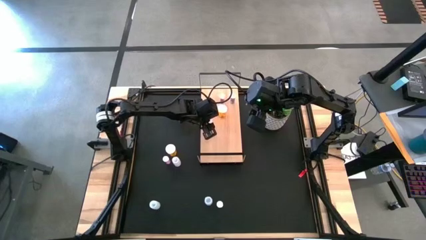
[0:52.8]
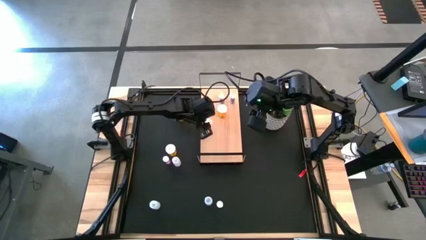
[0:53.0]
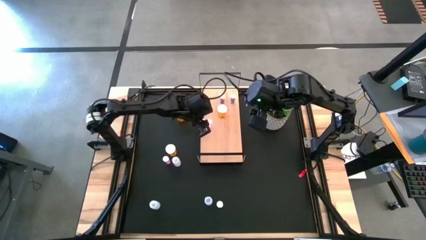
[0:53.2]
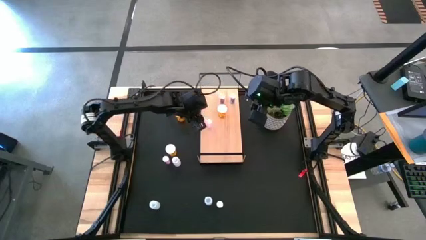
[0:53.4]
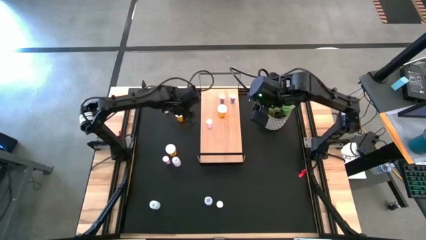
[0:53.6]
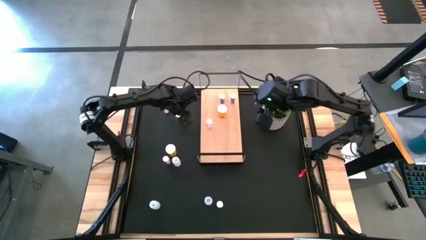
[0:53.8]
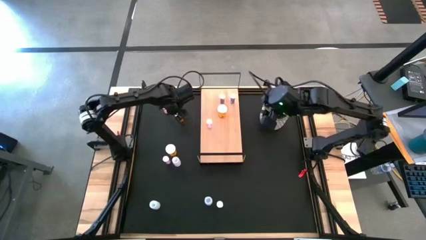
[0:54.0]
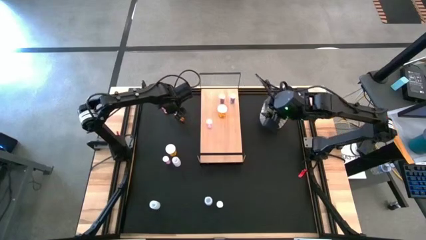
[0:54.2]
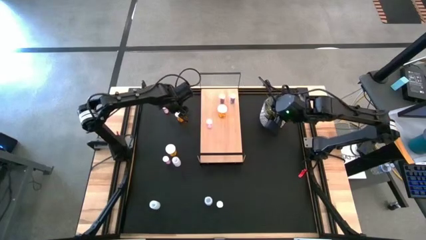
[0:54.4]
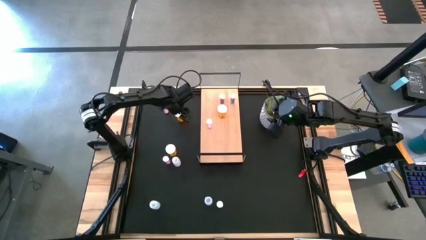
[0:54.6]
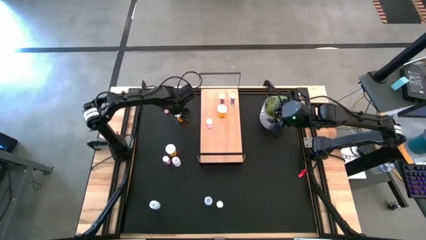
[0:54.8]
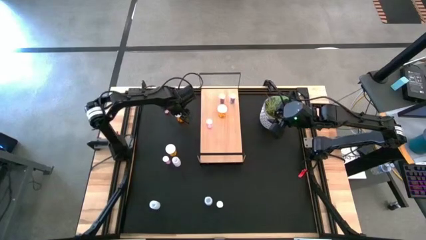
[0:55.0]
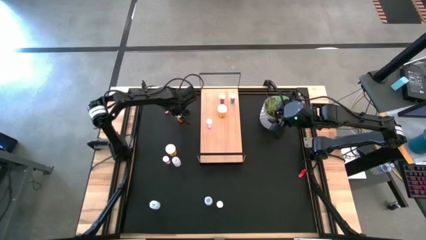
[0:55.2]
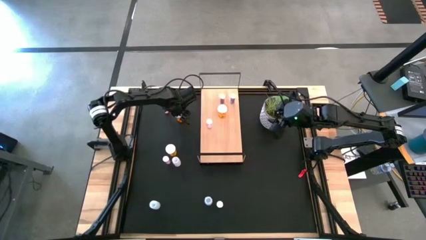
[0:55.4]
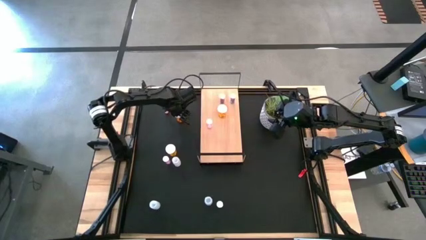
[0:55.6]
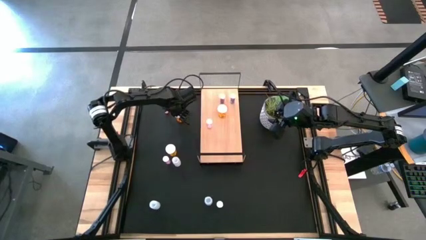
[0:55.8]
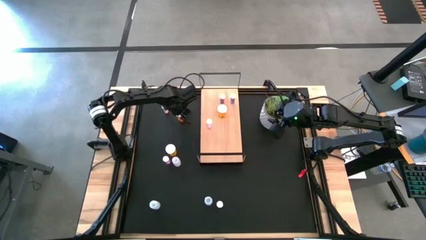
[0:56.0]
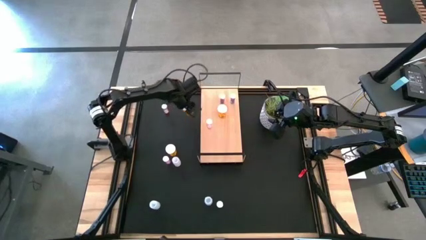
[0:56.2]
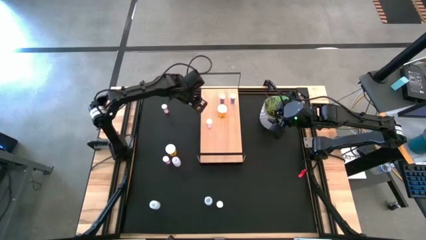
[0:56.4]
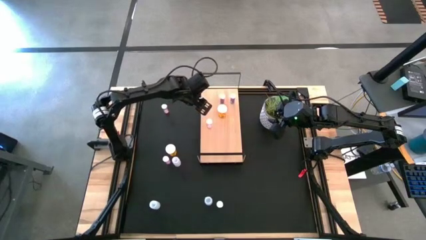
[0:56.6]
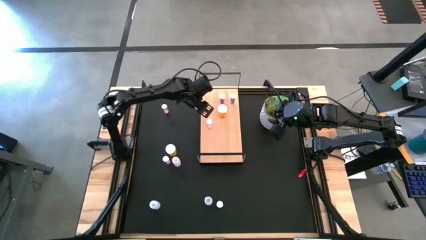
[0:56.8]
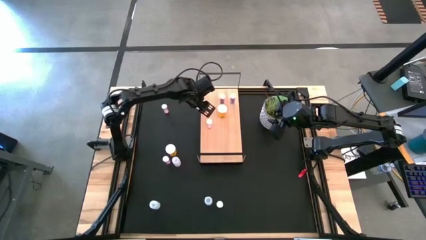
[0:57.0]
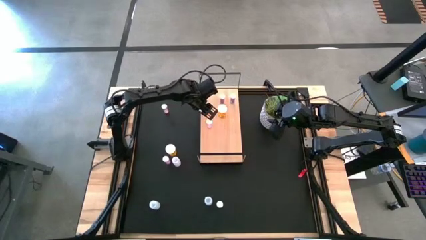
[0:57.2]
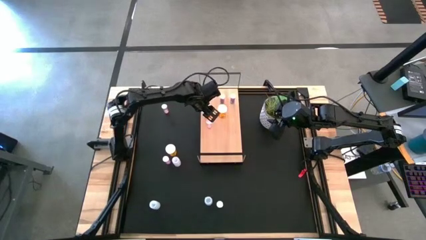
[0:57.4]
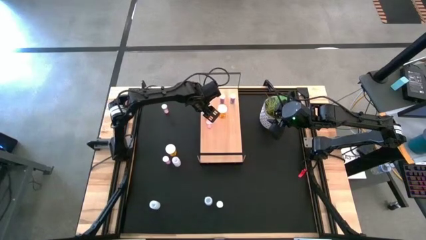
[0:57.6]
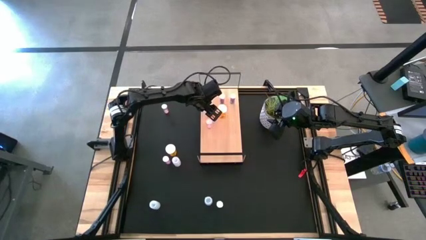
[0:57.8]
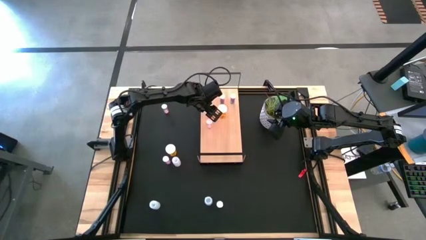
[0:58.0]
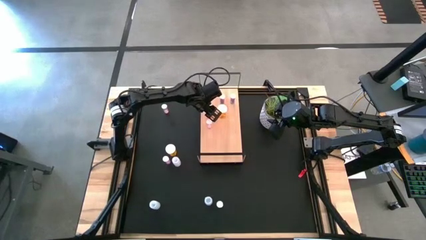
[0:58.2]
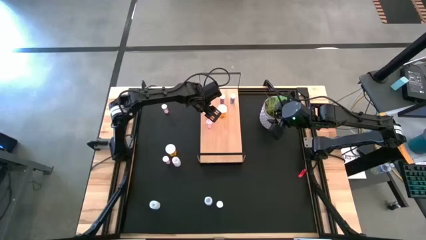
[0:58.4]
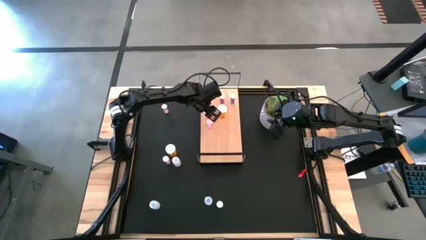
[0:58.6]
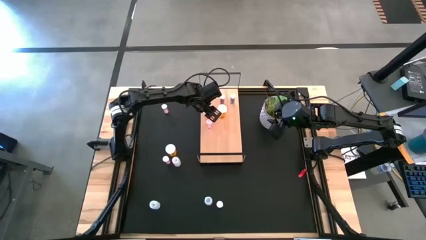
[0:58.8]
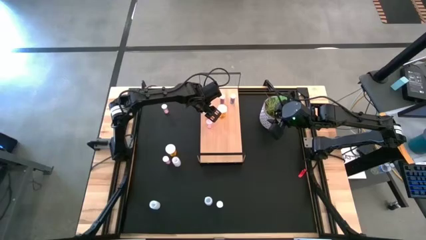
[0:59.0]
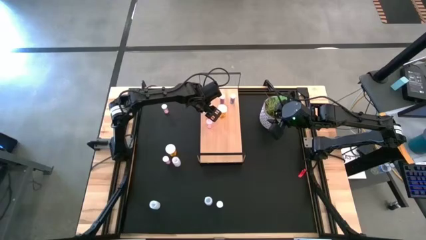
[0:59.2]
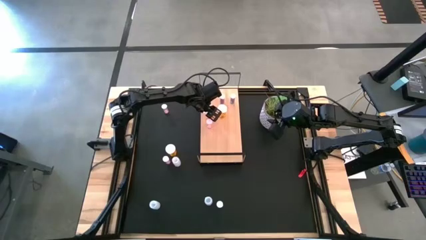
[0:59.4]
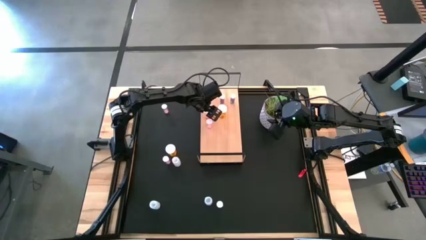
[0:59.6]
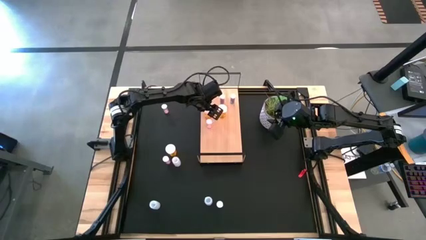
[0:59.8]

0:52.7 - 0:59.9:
Task: Pick and place medicine bottles onto shelf by color
Put the top orange pill bottle on the shelf aligned with the orange pill bottle

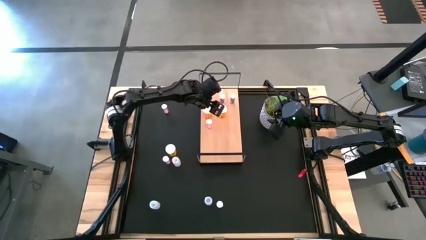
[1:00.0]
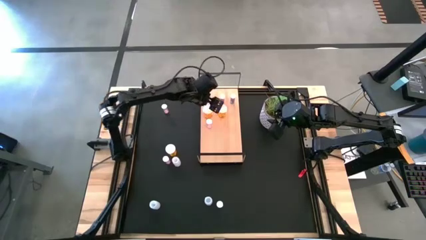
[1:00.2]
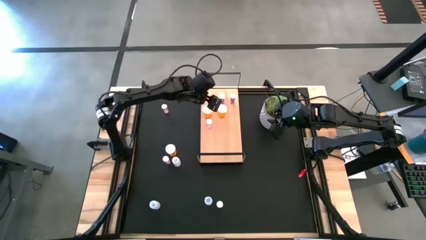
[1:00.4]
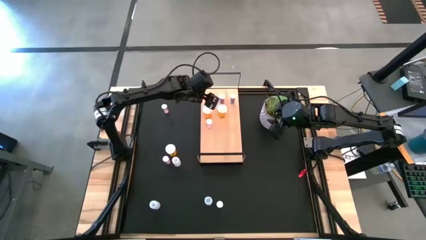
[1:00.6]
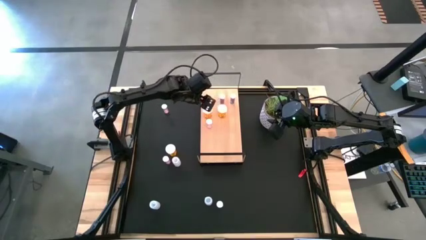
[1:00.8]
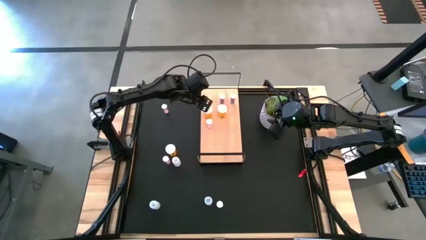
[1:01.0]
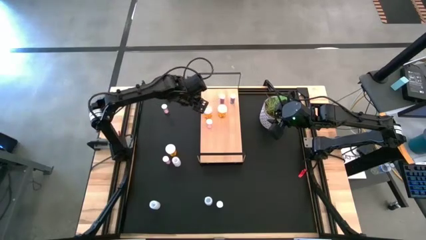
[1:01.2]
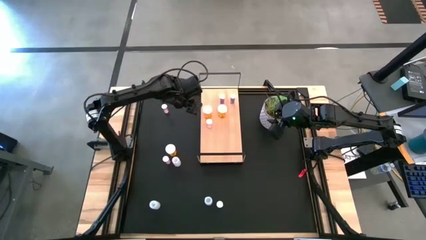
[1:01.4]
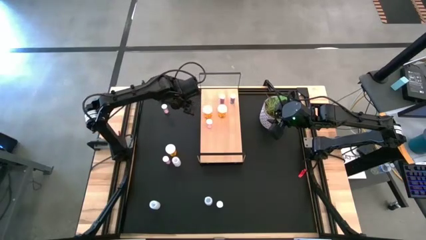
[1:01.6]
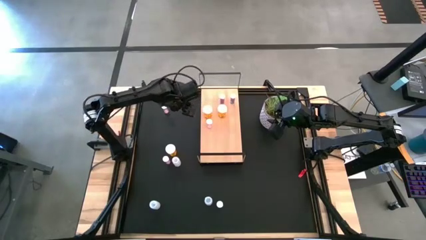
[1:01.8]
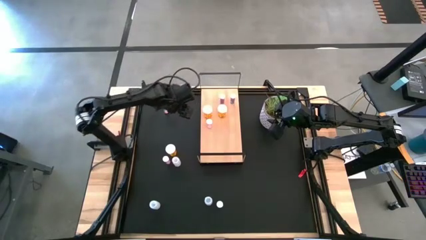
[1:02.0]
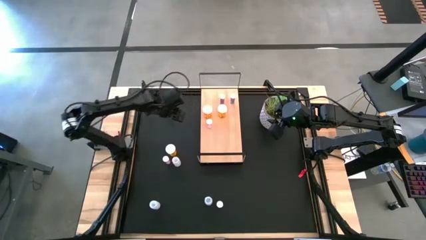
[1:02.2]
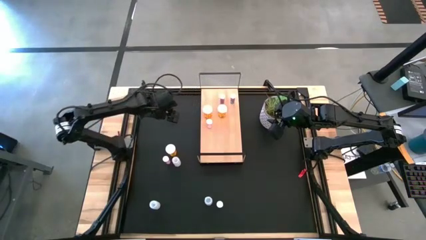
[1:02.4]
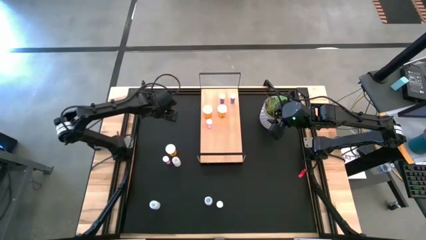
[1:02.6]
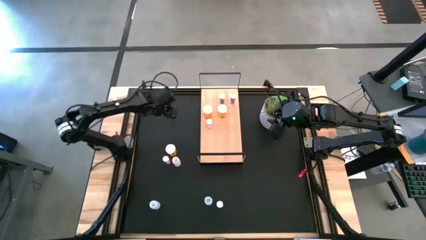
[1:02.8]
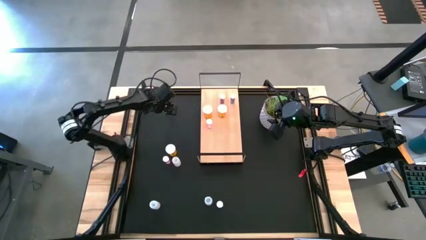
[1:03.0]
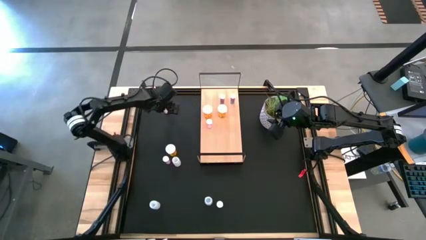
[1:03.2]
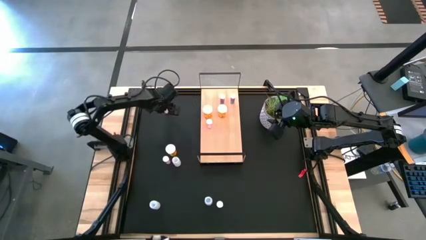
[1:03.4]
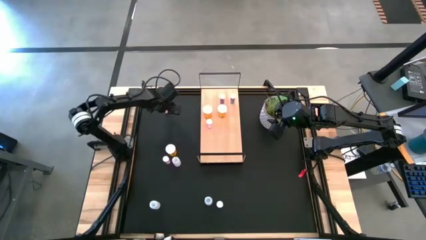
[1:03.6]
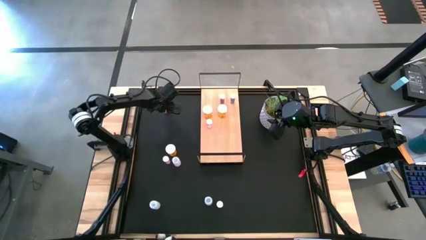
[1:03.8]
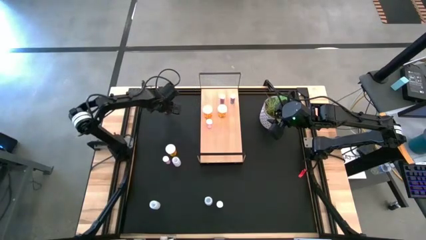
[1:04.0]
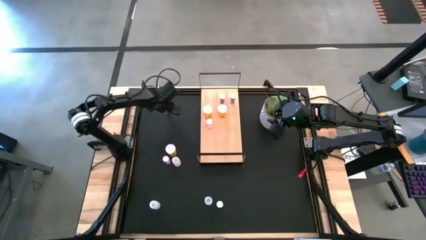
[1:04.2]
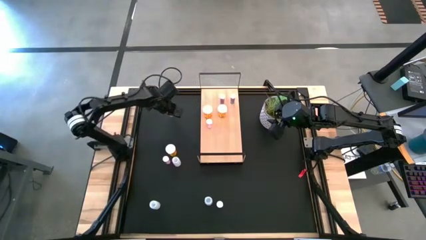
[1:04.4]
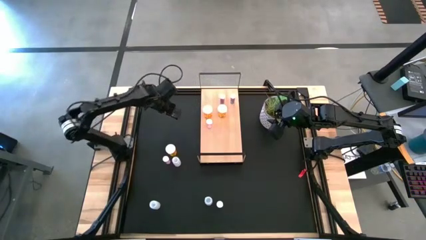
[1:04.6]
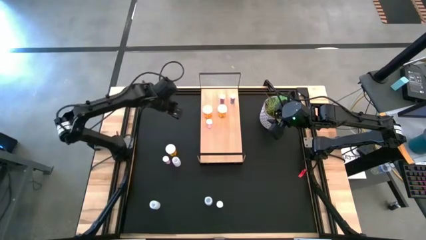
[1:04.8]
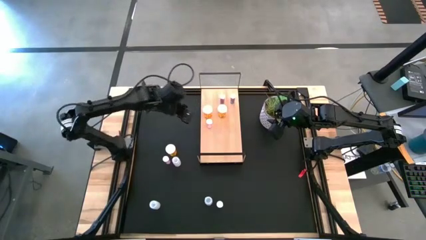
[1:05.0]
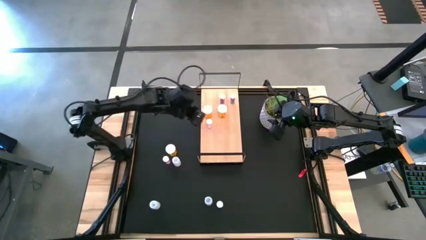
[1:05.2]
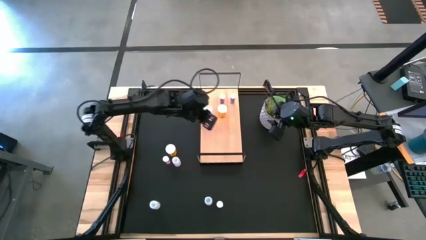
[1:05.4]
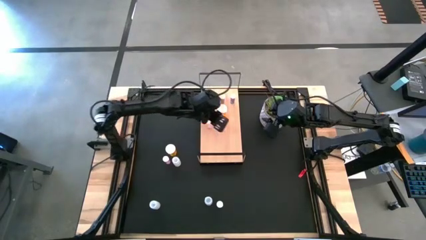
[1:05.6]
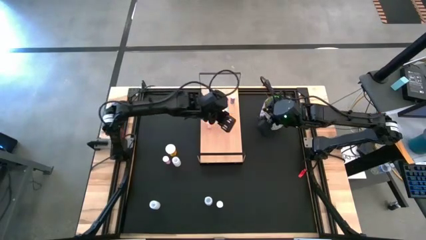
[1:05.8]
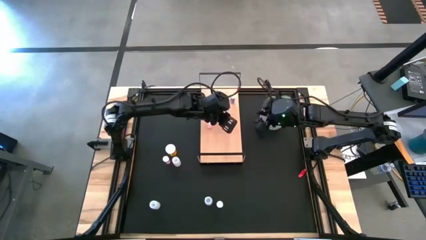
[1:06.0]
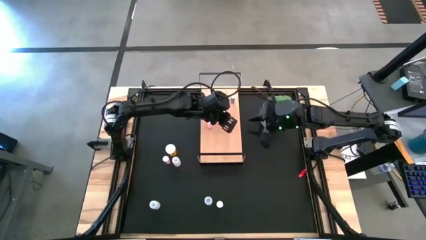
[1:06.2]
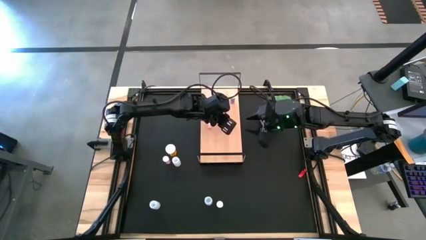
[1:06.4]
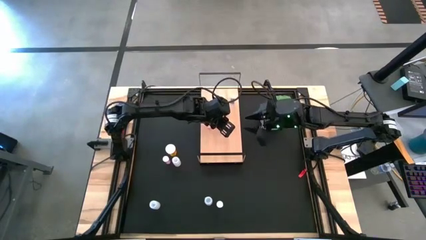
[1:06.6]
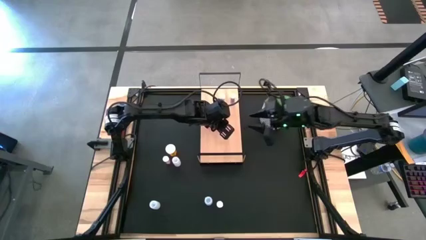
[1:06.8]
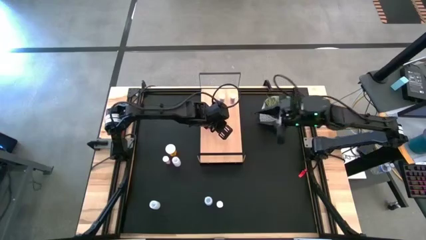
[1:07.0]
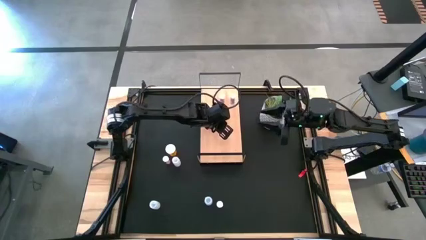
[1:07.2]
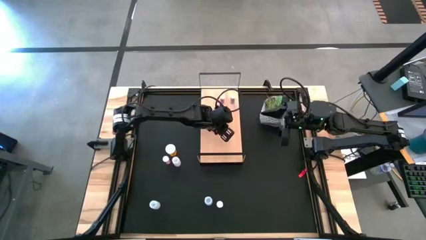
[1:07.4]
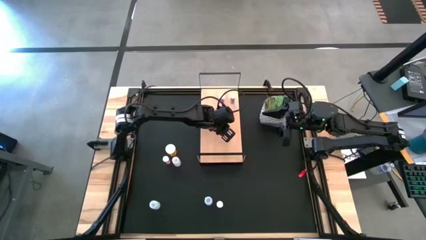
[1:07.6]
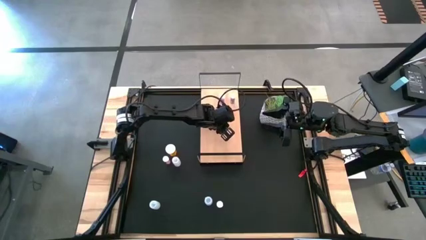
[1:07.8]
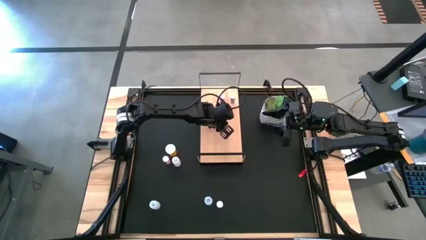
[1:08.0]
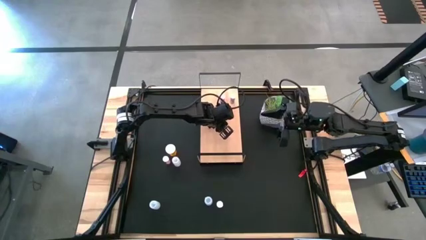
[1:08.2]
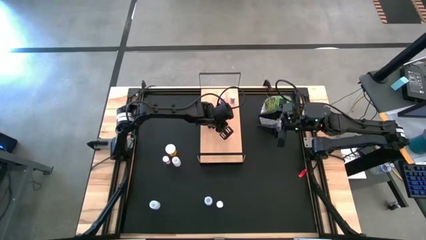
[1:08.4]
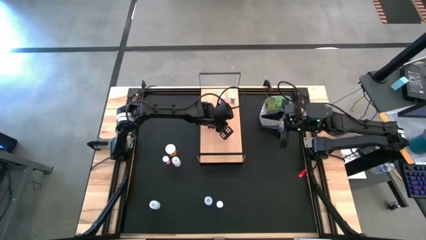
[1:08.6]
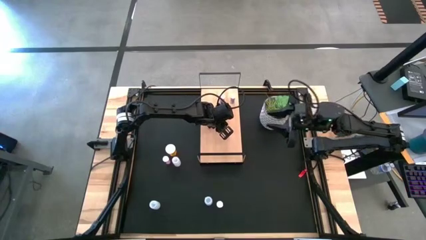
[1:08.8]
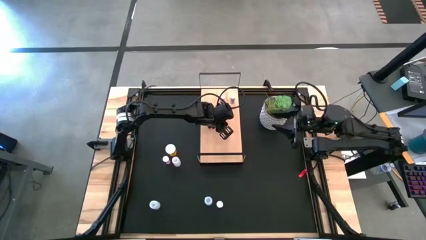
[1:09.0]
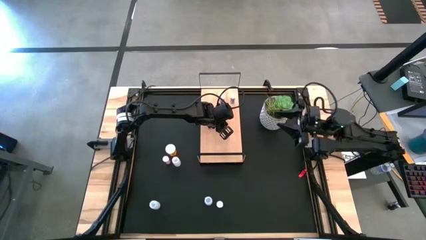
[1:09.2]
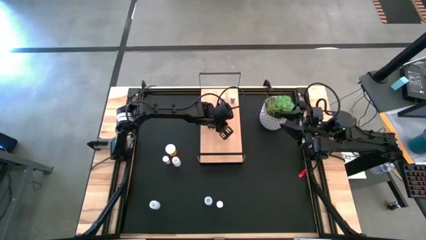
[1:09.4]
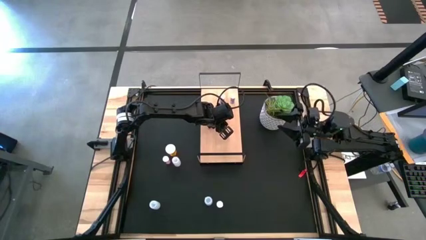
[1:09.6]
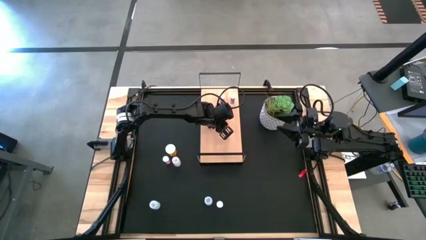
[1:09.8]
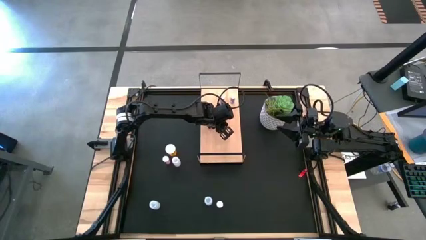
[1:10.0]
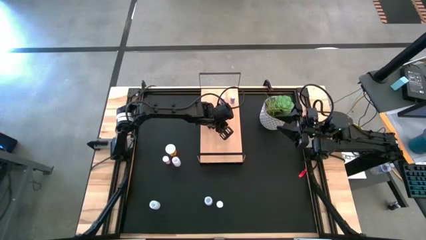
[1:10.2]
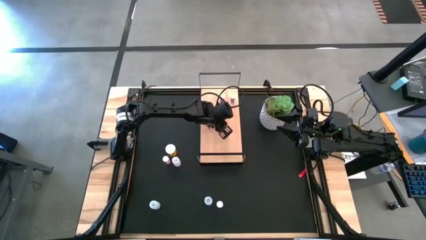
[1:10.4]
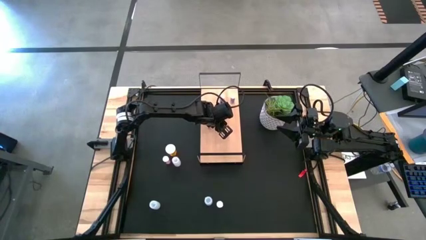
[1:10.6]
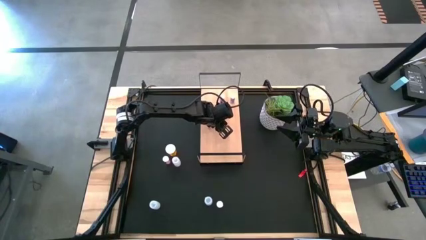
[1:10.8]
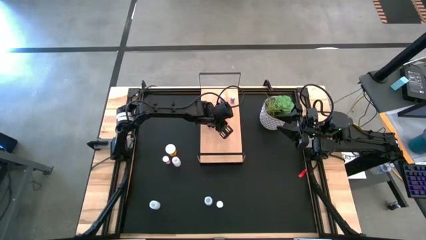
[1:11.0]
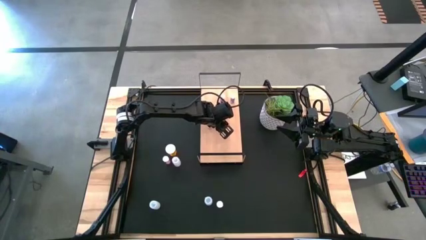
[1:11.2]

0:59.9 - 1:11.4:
Put the top pink pill bottle on the shelf aligned with the pink pill bottle
